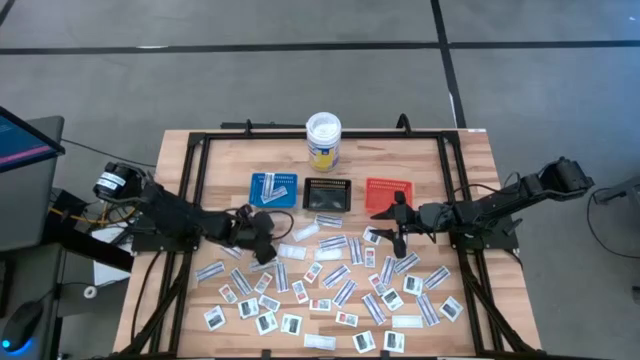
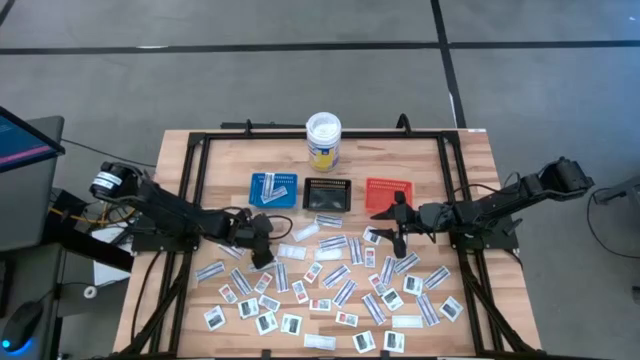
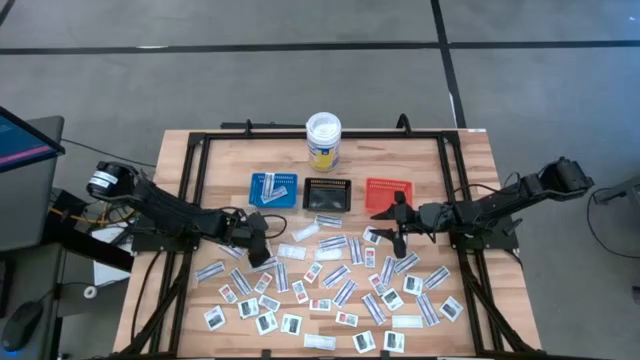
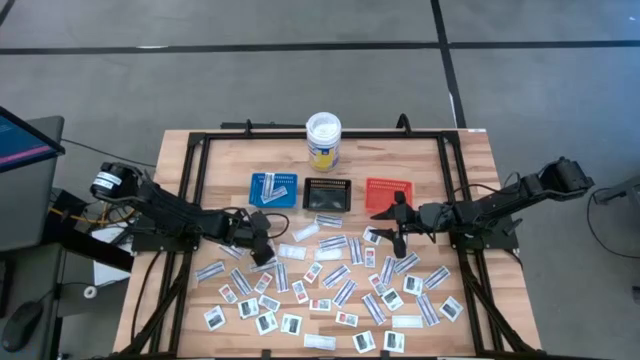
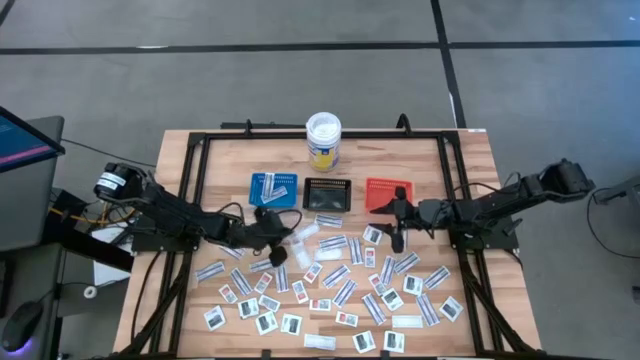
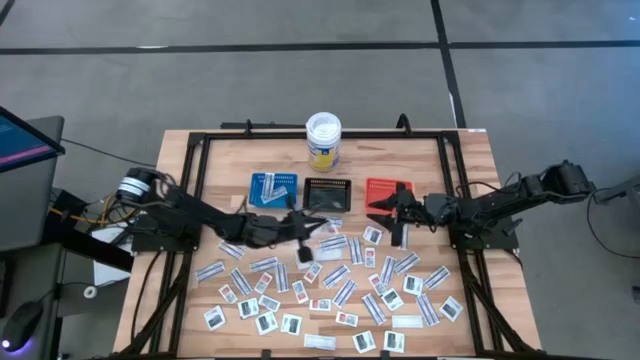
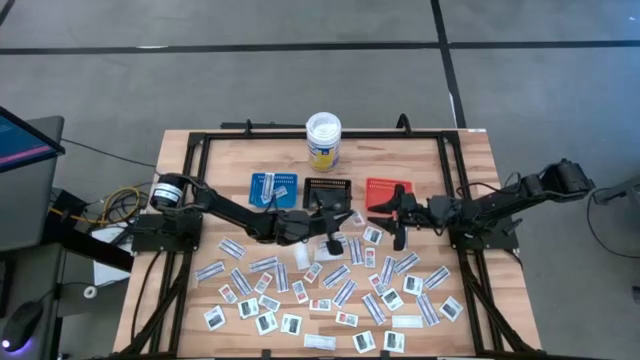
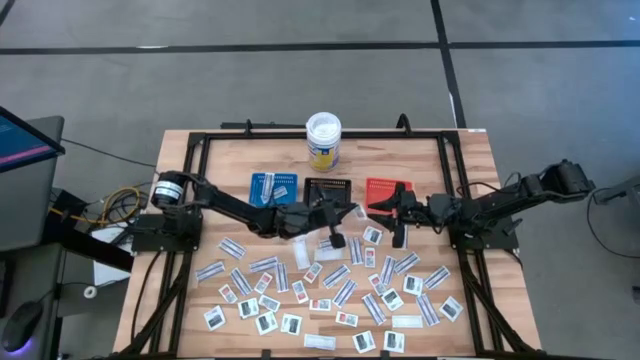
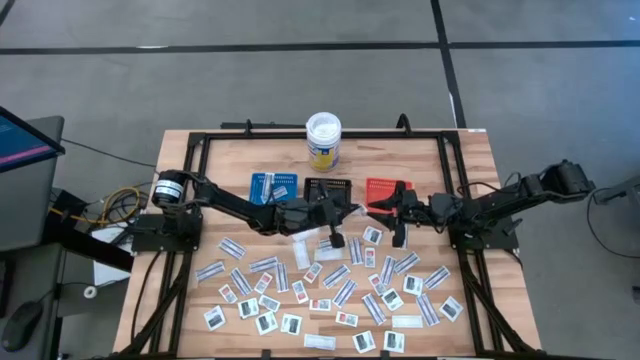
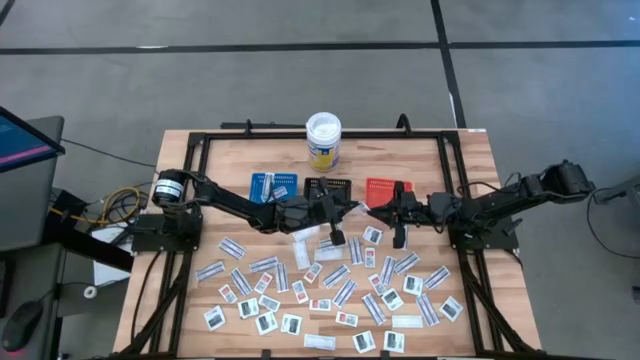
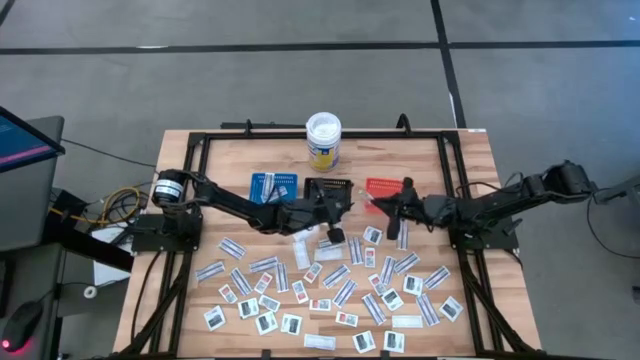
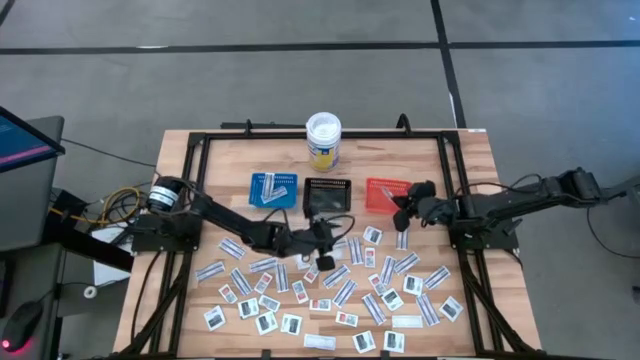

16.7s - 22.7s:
Task: Pick & Place First Aid Supplies
Put the orange ointment pack into the orange bin

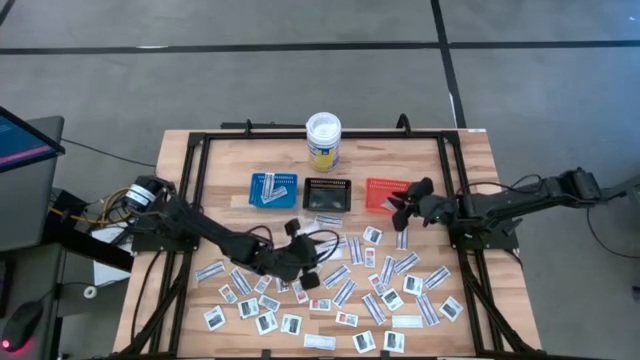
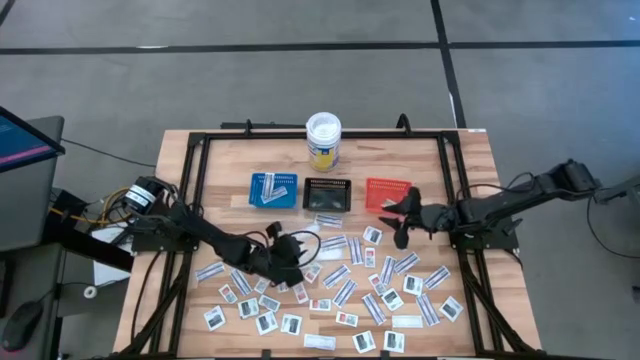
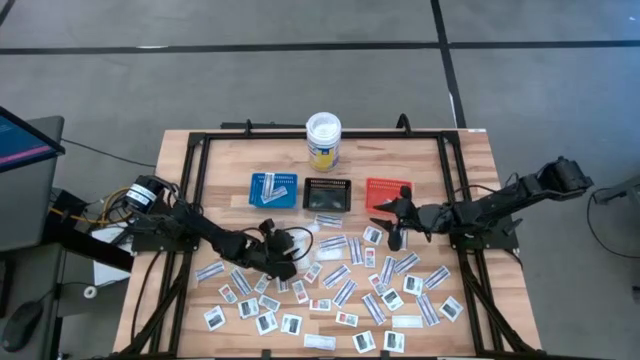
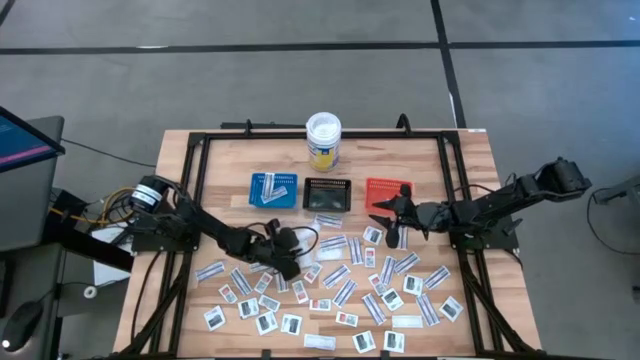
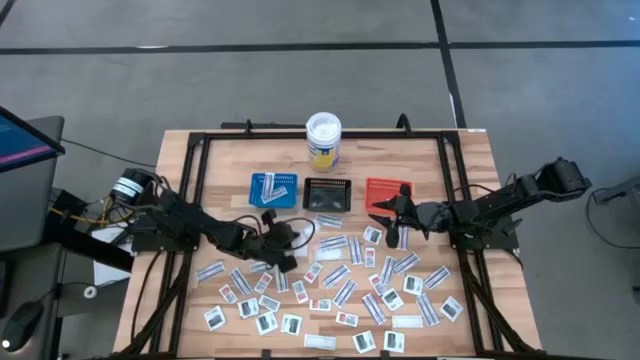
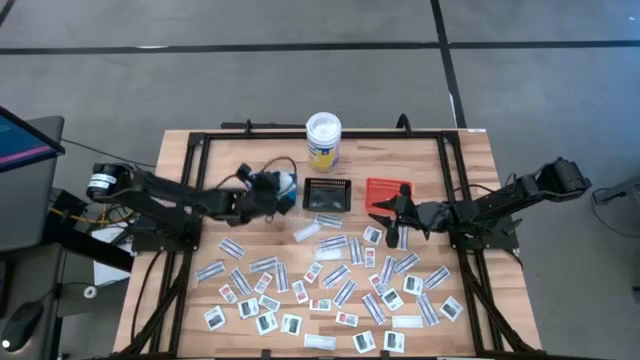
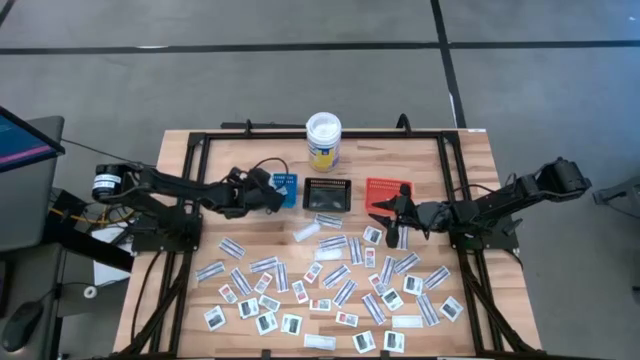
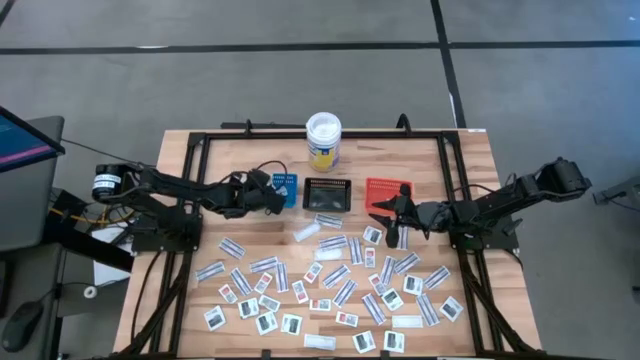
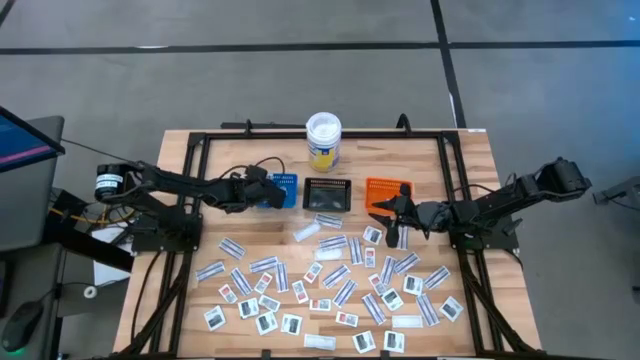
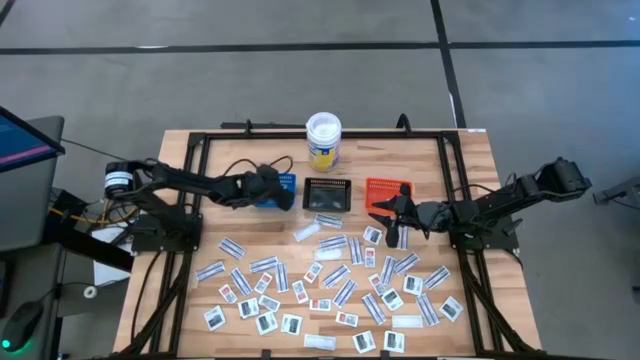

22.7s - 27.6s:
Put the blue bandage into the blue bin

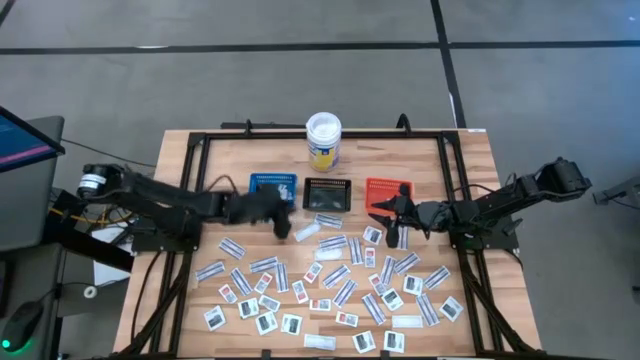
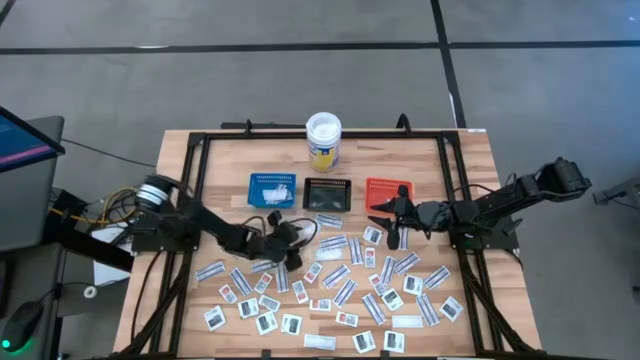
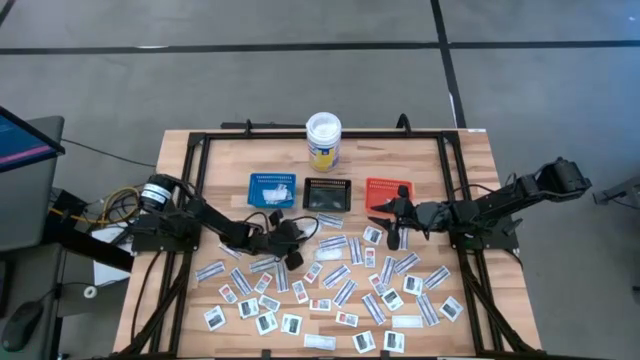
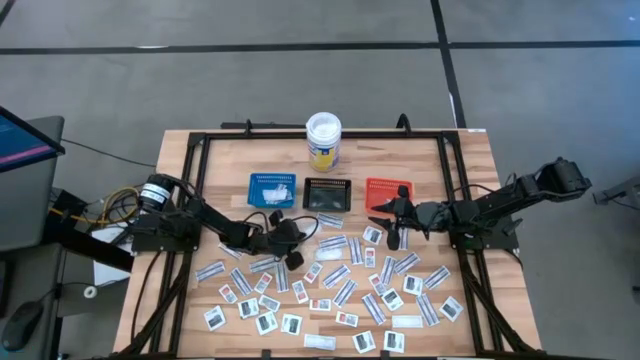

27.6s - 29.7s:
Put the blue bandage into the blue bin

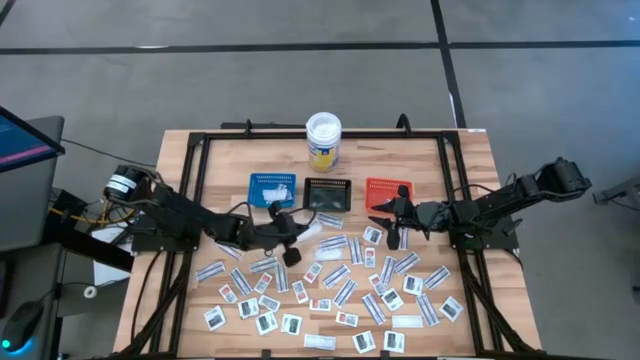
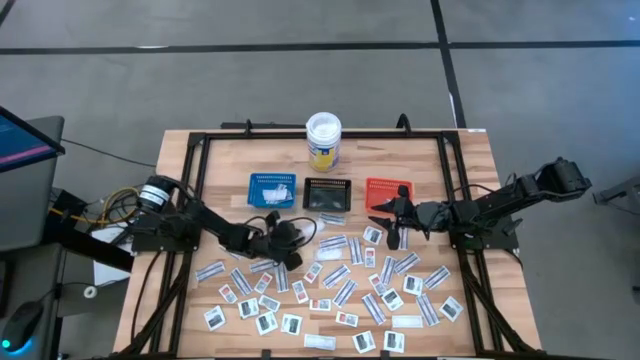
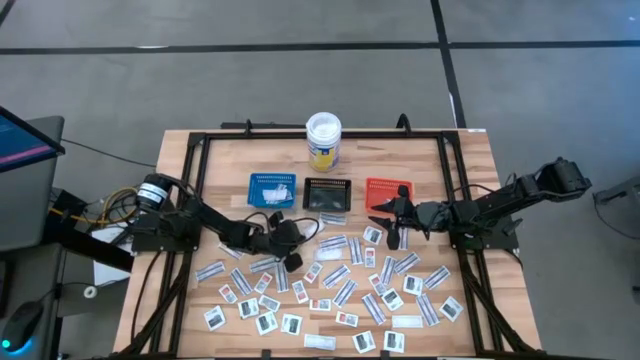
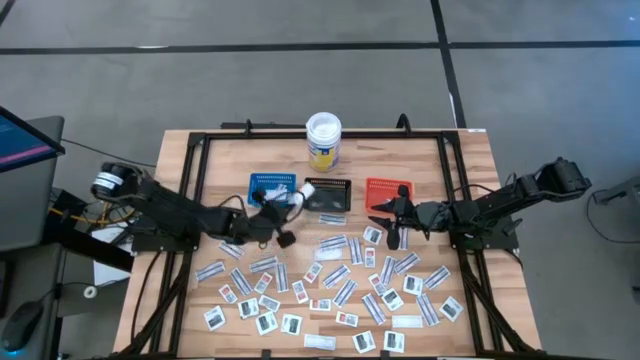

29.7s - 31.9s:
Put the blue bandage into the blue bin

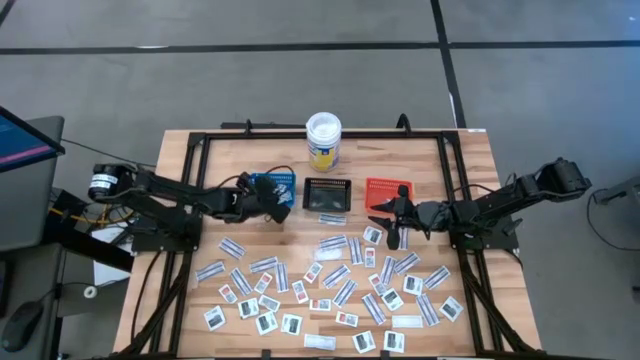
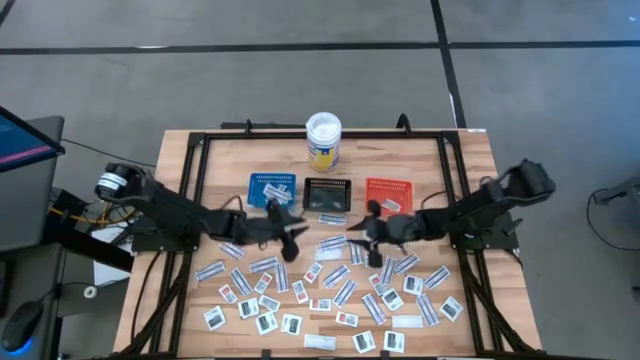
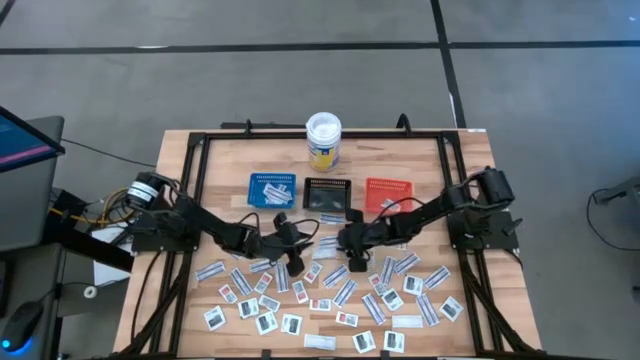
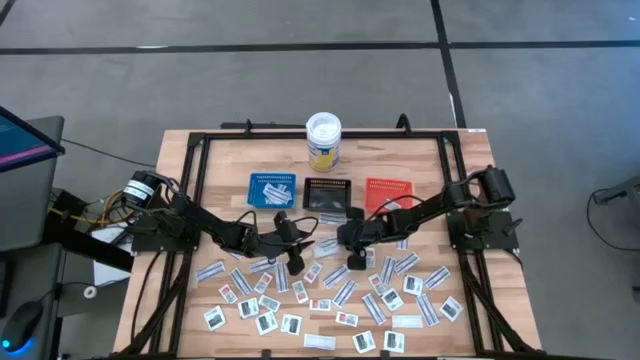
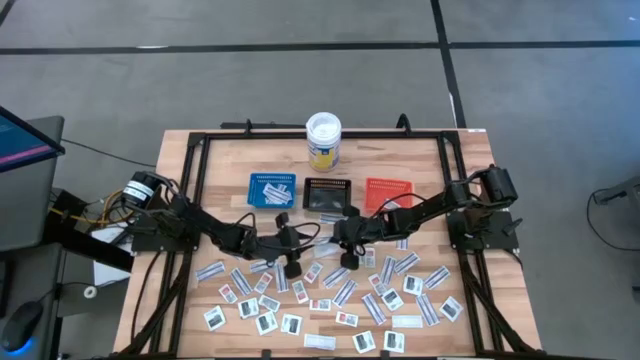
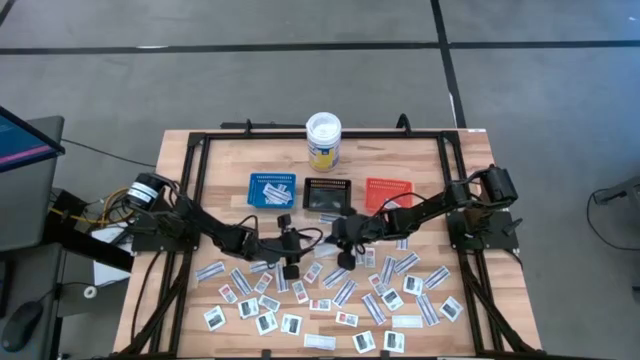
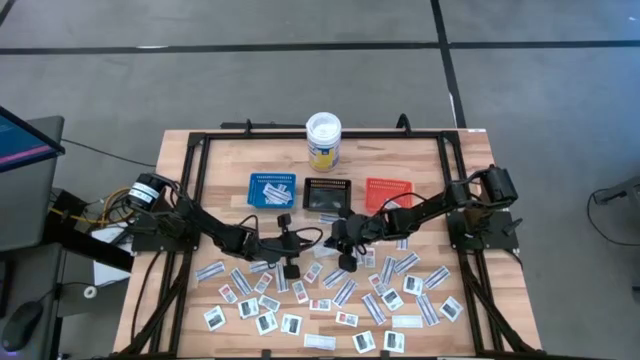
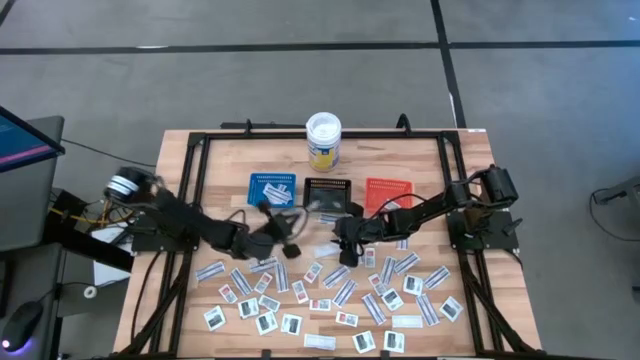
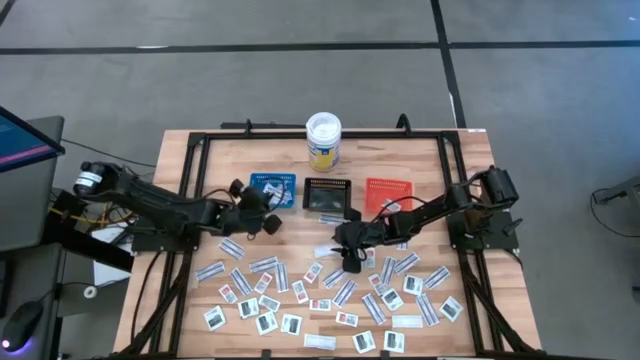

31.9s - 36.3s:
Put the blue bandage into the blue bin

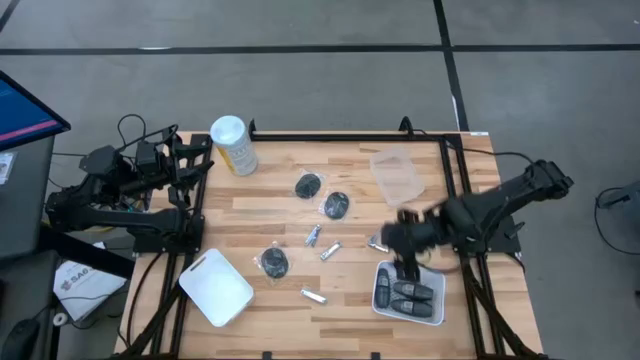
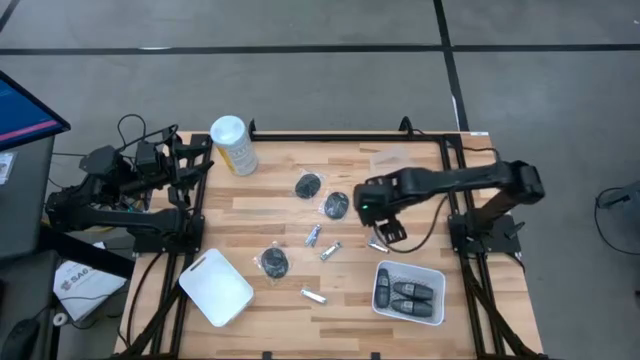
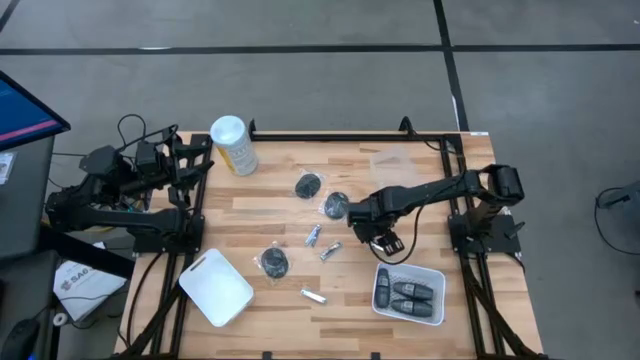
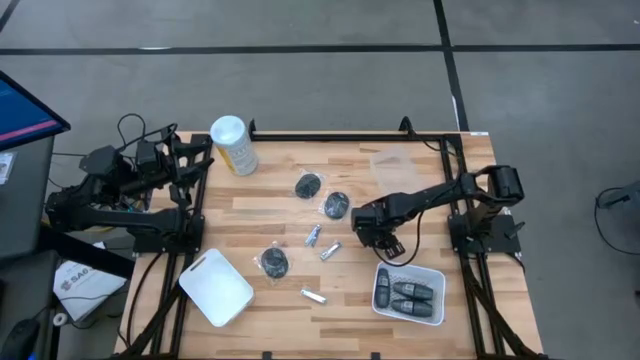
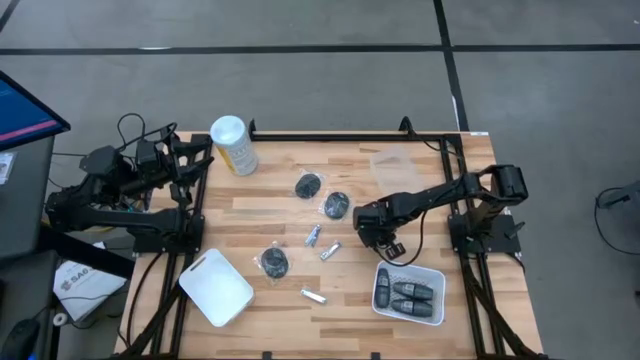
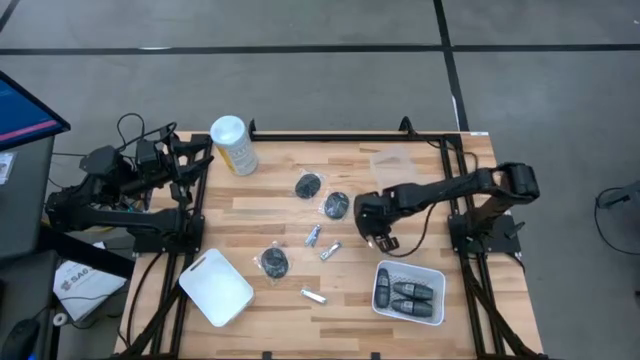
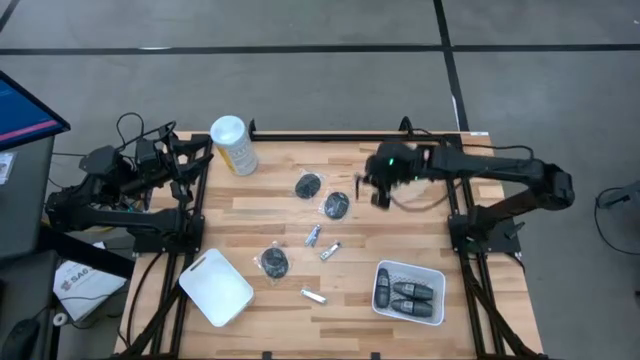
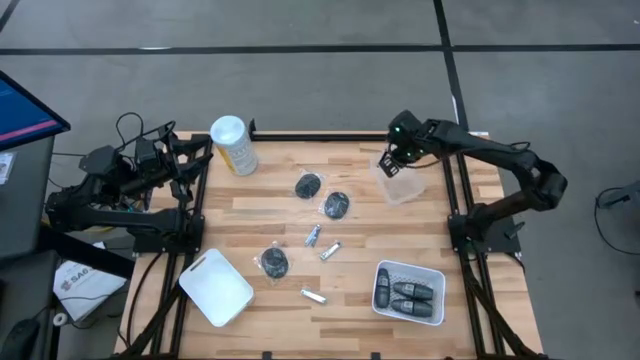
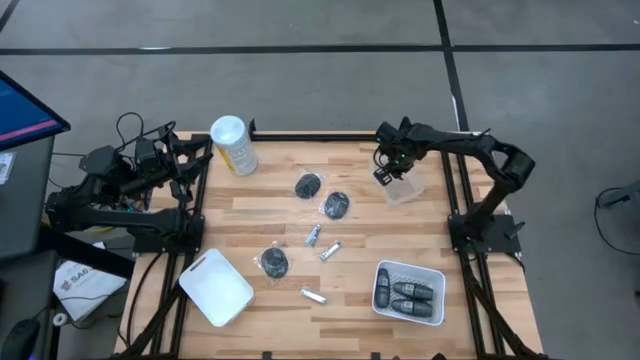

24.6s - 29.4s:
Task: Pick & Place Travel size toiletries
Put the silver nail cutter into the transparent bin
